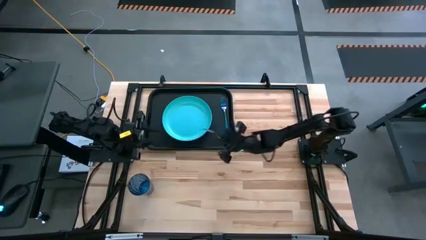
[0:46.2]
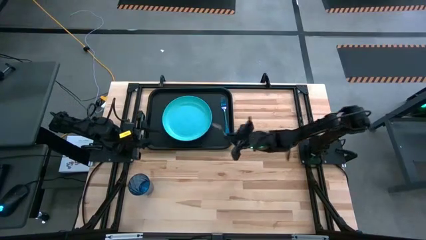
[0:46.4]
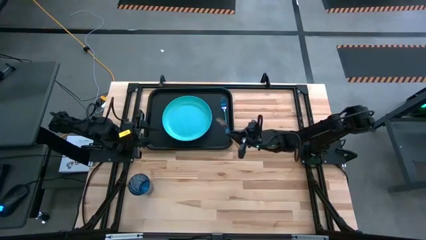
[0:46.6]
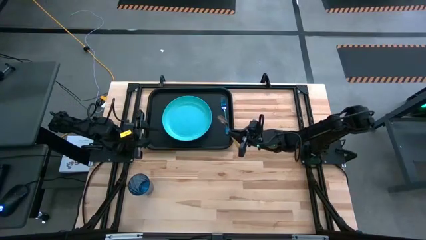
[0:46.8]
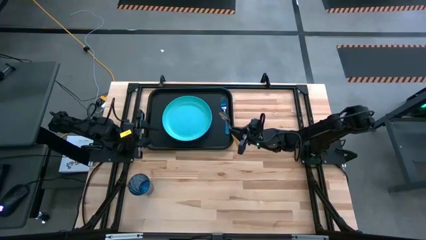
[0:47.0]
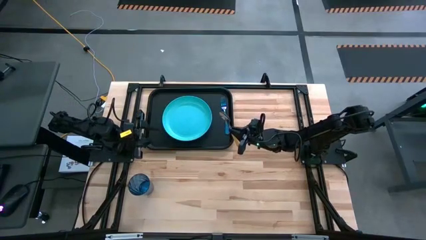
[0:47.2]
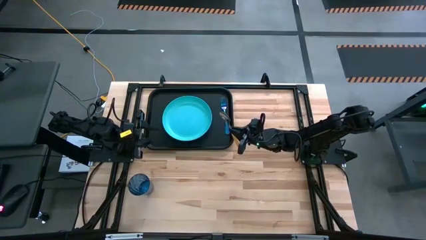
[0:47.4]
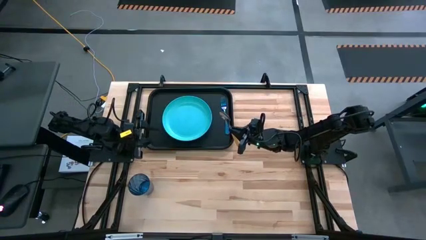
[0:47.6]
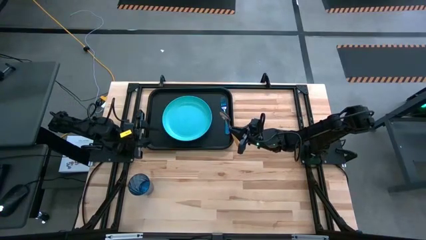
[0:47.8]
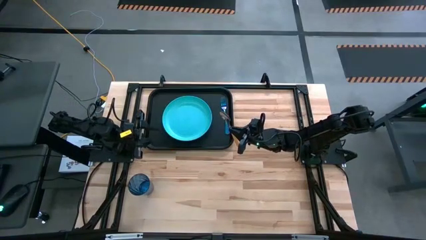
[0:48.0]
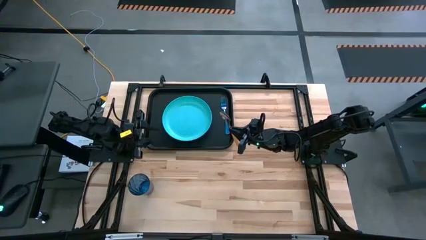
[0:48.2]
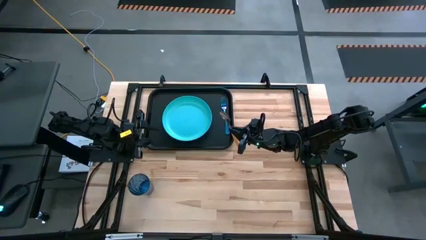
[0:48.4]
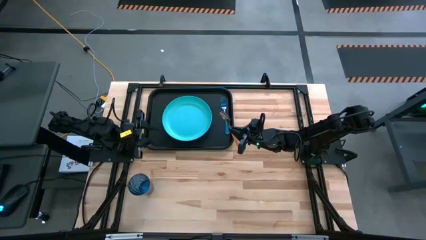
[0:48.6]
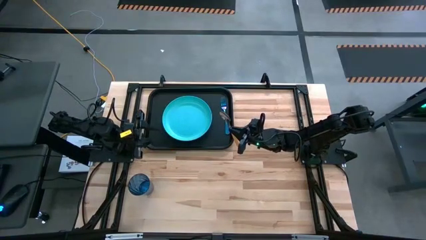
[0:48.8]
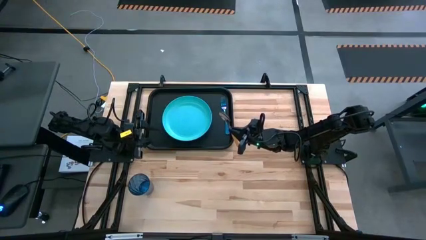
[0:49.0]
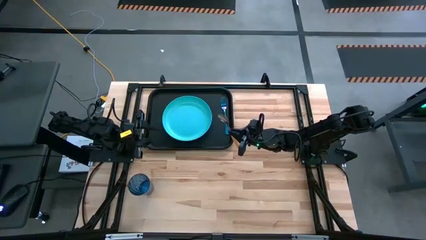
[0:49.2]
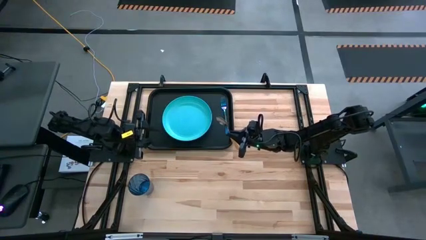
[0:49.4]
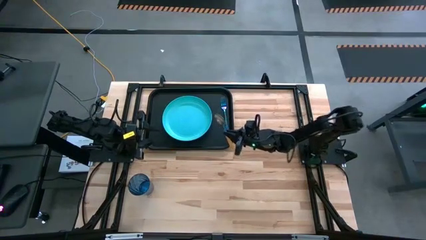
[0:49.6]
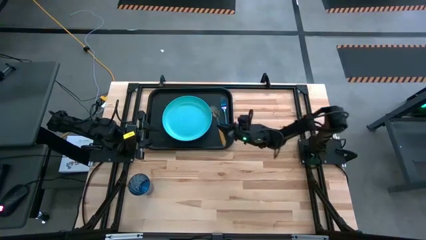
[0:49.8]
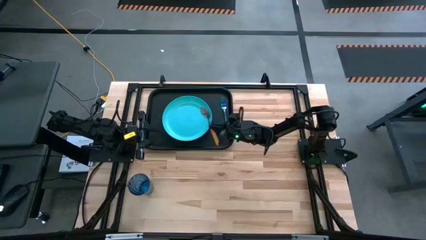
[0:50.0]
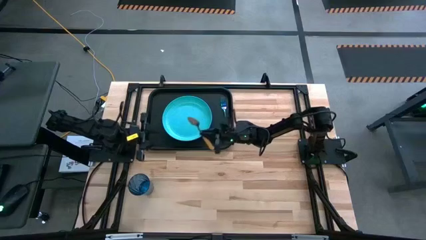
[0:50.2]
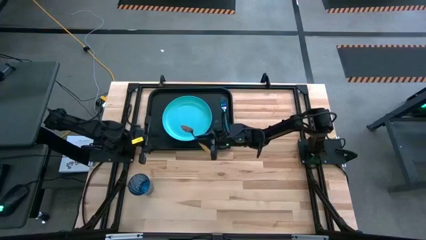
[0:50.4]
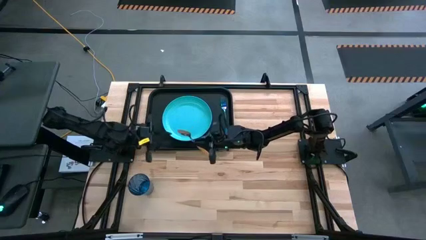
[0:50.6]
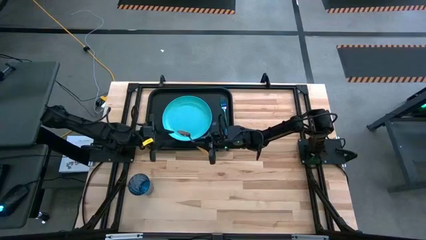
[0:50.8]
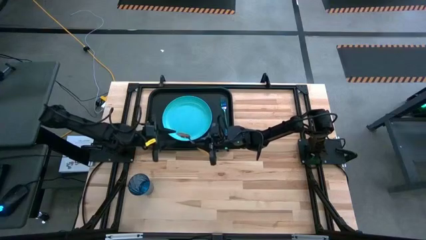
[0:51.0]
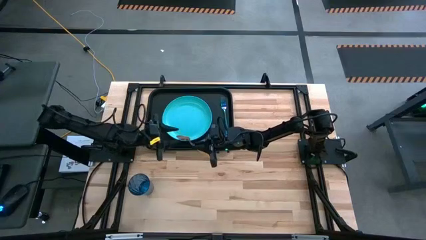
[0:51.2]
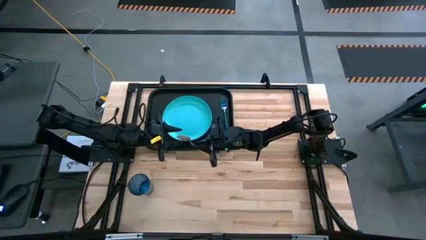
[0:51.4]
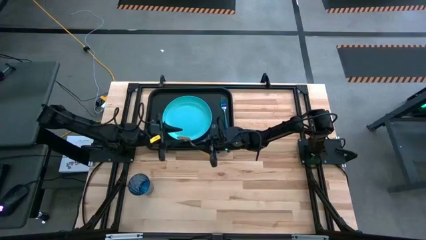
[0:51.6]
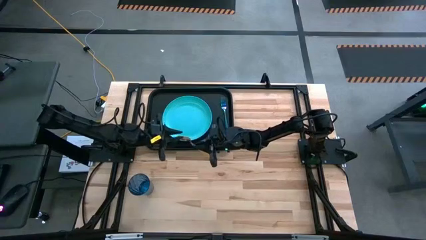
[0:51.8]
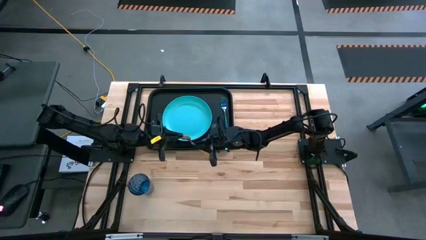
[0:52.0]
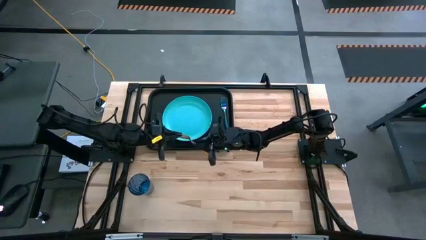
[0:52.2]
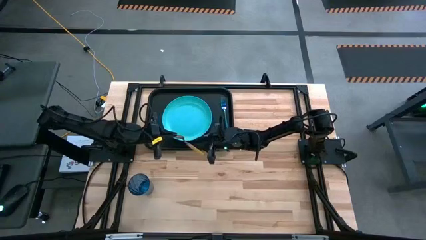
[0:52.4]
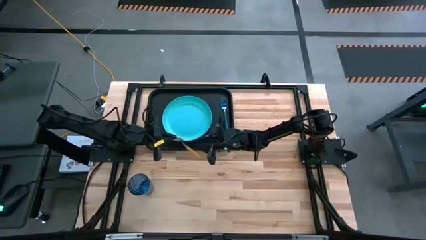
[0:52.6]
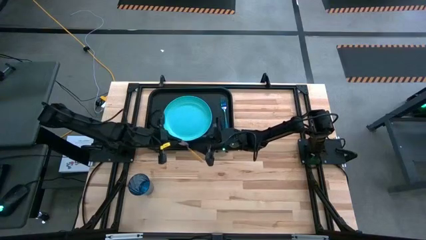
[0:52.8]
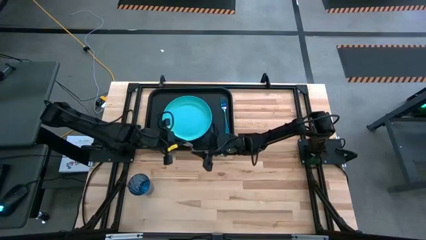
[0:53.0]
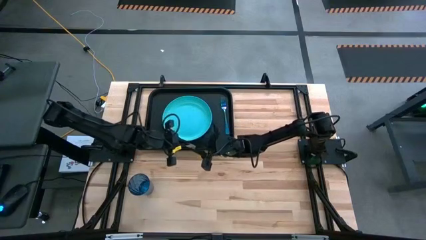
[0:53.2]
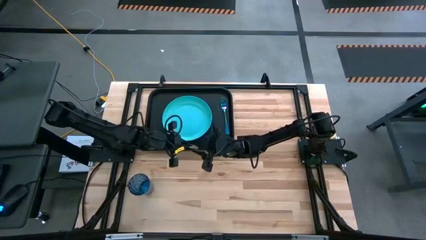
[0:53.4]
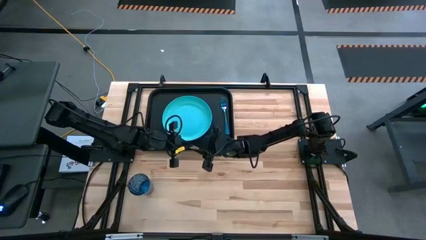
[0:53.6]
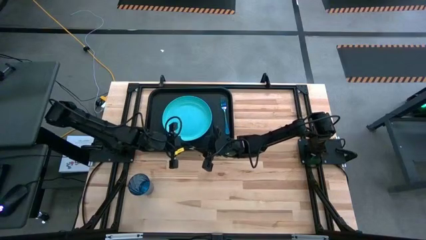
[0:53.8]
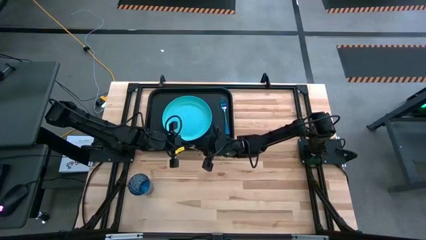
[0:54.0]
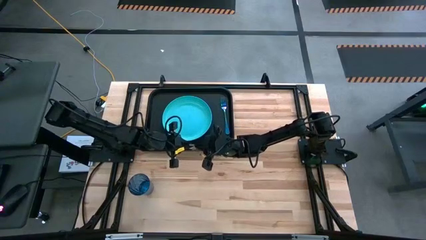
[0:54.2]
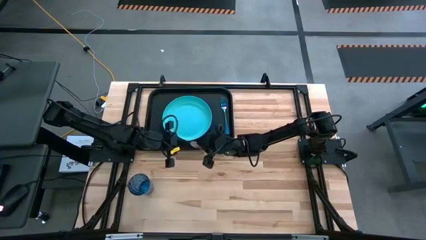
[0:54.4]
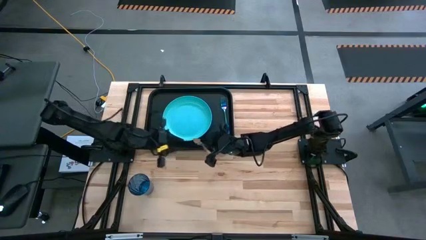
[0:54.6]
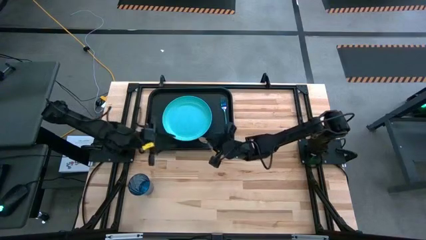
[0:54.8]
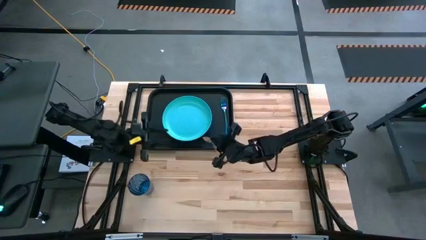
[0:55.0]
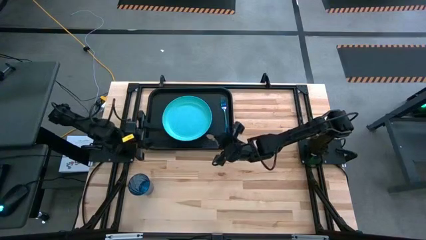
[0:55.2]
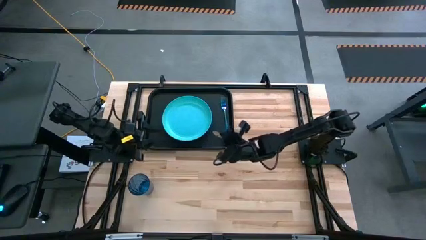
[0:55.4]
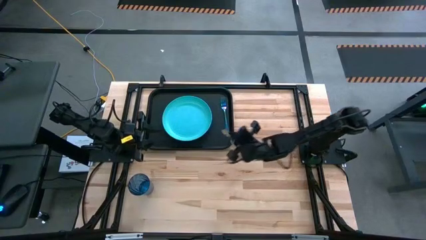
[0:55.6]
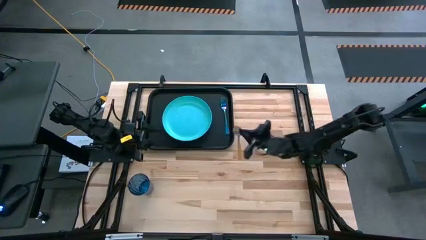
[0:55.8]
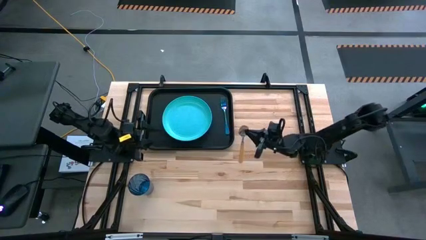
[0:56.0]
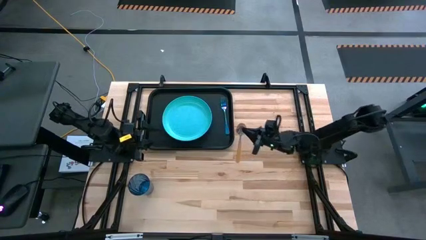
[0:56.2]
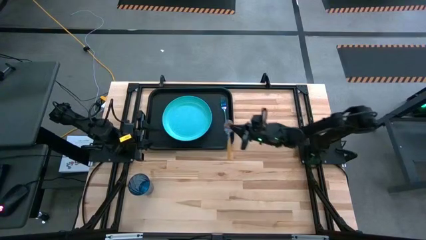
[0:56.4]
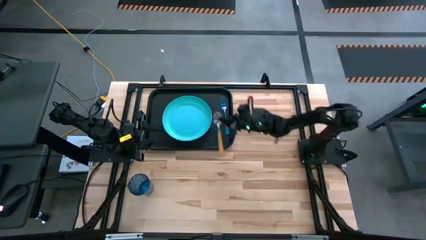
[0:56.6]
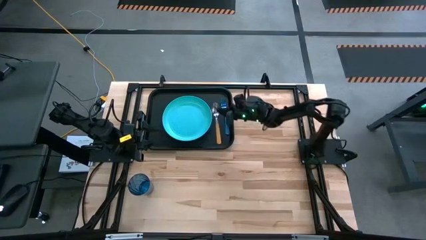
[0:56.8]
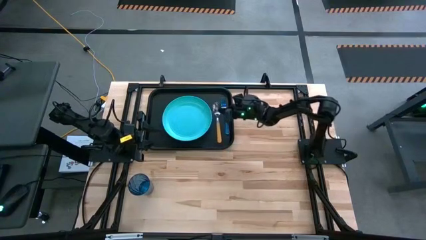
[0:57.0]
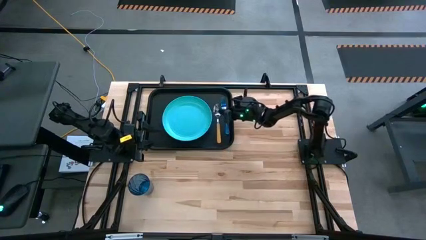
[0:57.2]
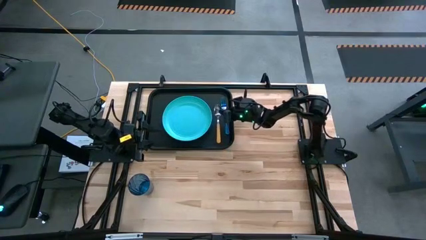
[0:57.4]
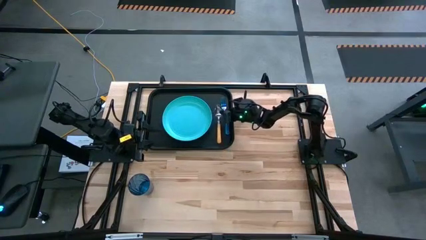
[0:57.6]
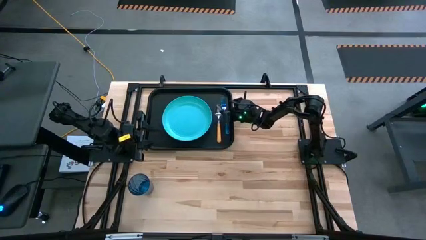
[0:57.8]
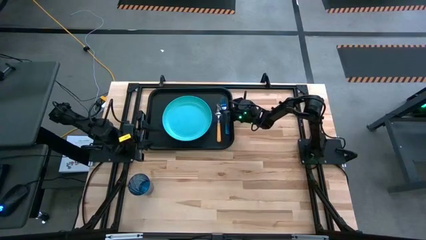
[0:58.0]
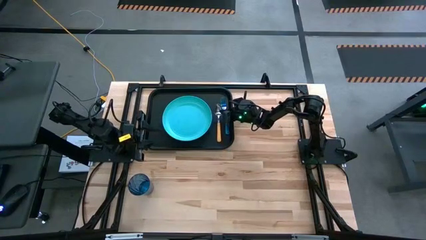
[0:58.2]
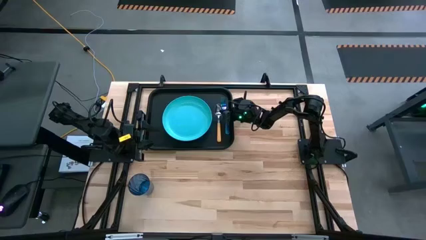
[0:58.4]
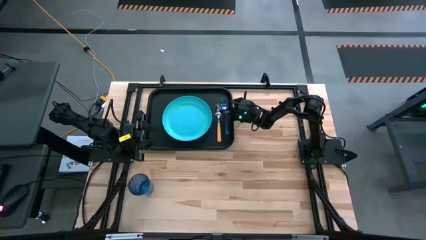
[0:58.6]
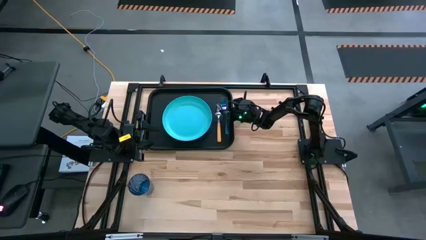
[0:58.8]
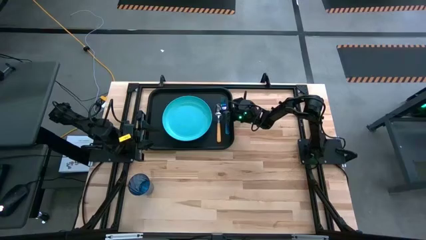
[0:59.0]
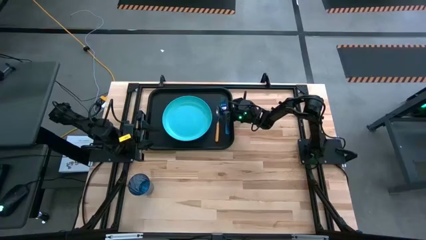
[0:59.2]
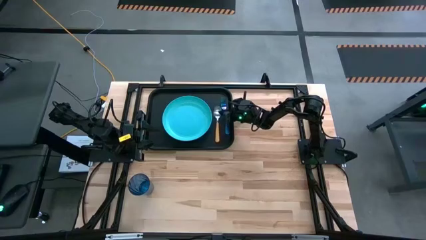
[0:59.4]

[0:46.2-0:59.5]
Task: Pick and place plate/cup/fork/spoon on tray
Put the orange spoon on the black serving tray beside the blue fork

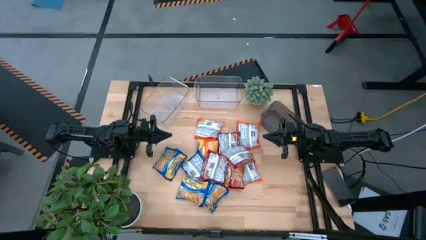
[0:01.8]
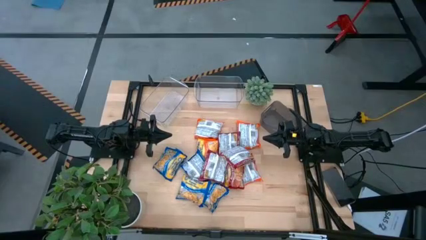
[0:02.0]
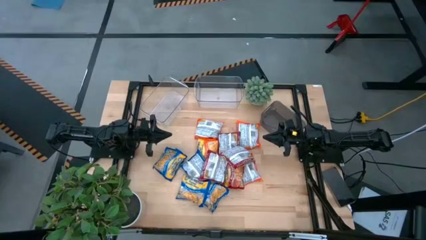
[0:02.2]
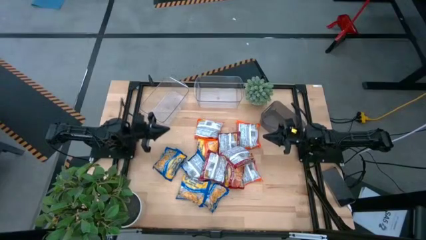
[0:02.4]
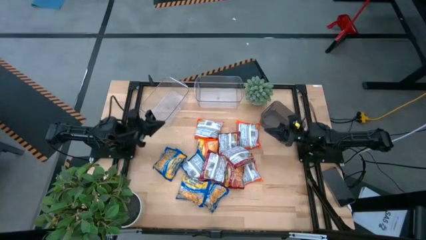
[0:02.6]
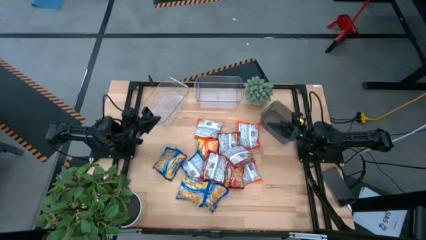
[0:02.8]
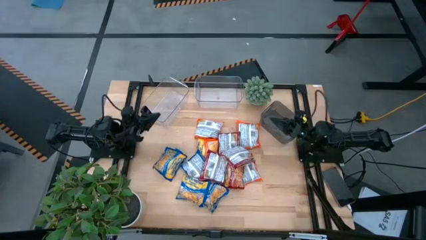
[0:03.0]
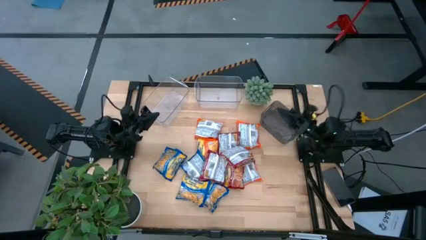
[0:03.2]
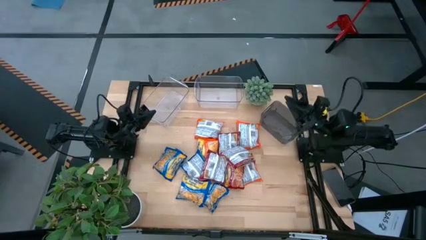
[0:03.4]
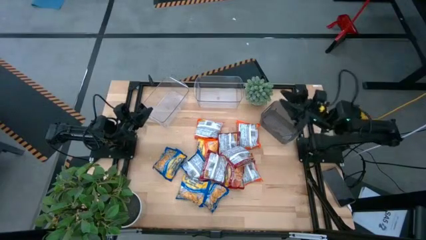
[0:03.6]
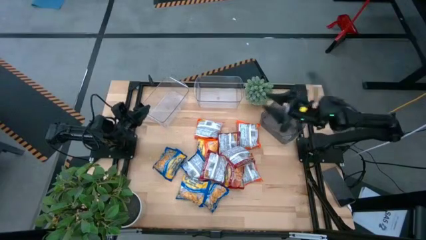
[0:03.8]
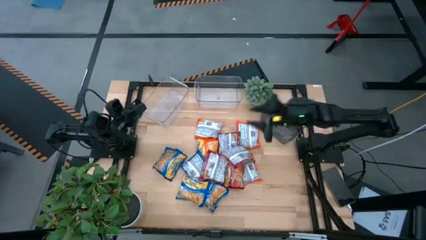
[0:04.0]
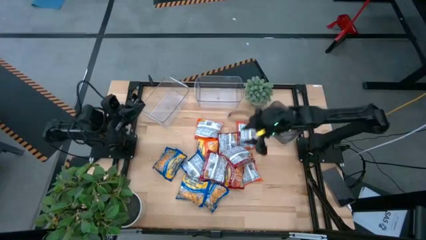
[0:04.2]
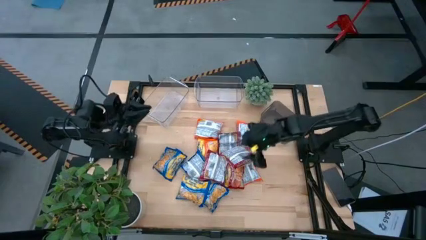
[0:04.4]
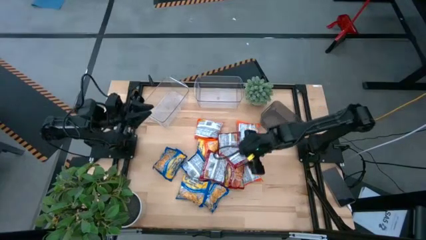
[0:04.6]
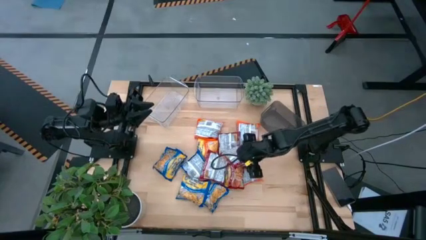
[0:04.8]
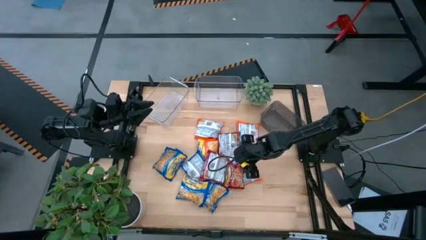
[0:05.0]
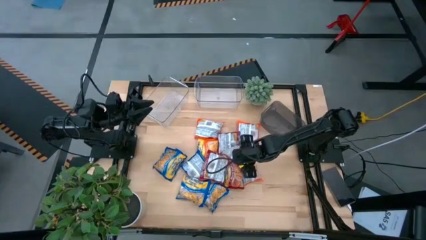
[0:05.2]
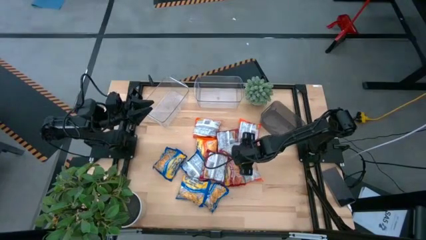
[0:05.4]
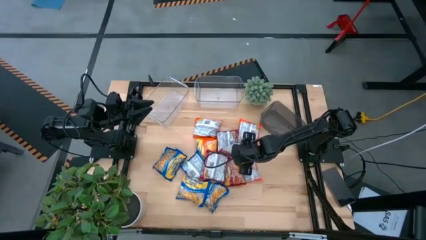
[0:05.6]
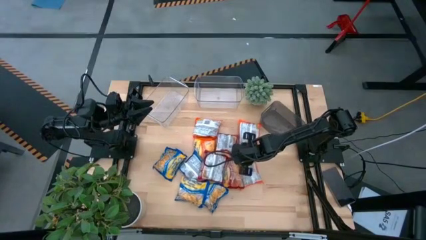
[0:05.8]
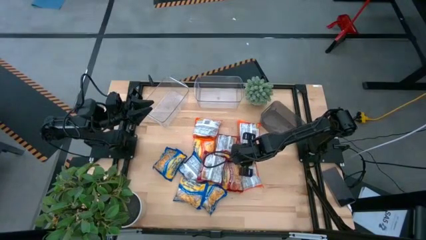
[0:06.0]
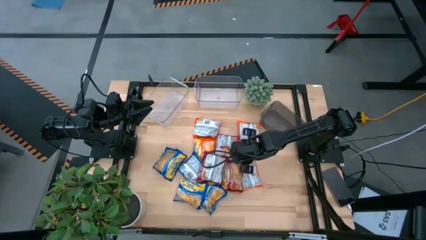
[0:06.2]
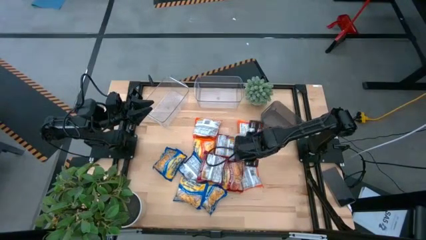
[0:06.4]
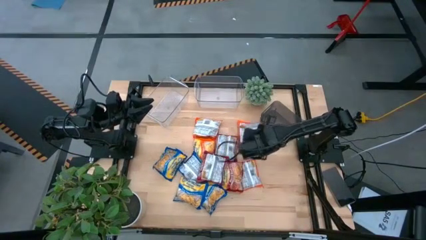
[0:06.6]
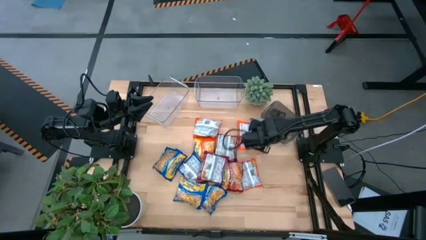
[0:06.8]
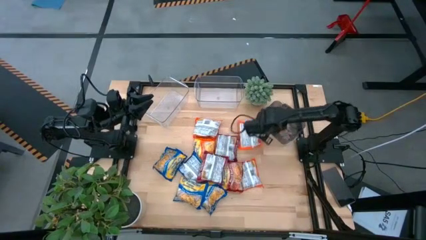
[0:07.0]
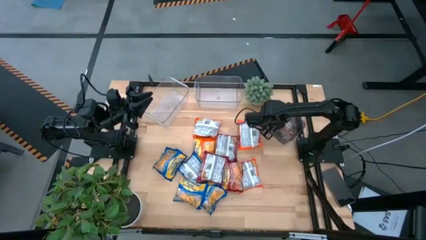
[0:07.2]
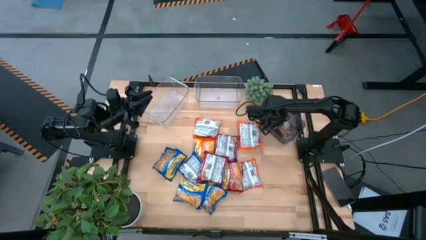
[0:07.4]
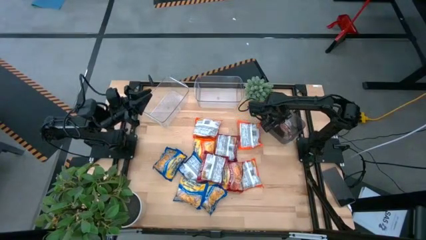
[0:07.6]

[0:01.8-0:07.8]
Task: Sort Maruchan noodles
Put the red noodle pack into the transparent black bin
